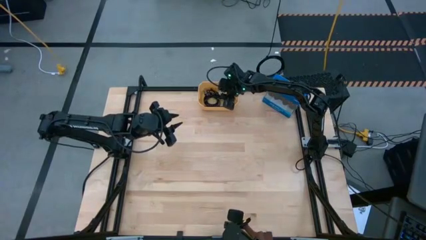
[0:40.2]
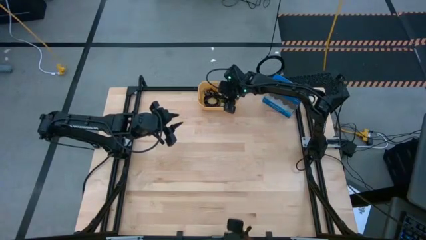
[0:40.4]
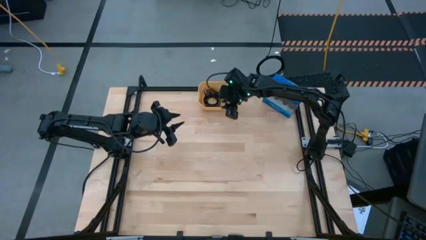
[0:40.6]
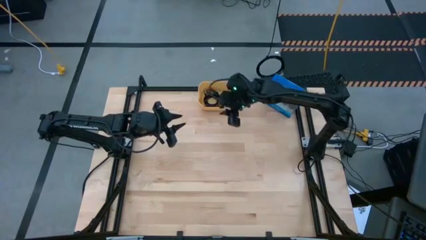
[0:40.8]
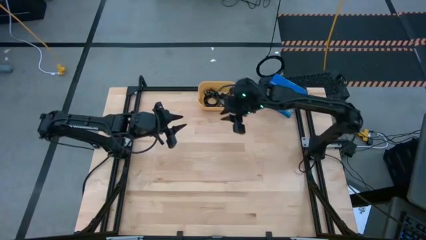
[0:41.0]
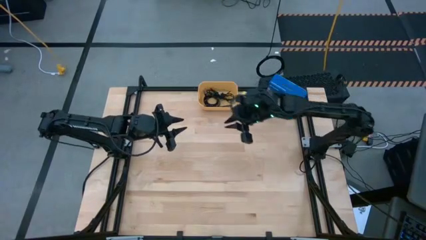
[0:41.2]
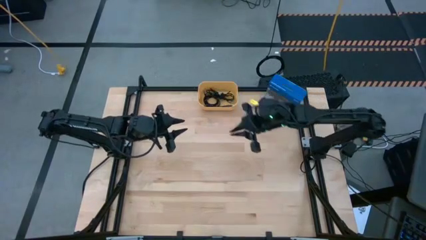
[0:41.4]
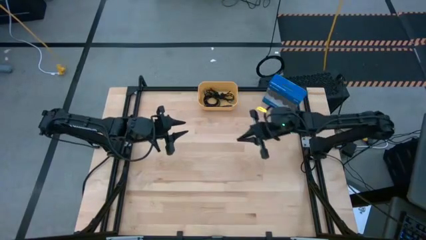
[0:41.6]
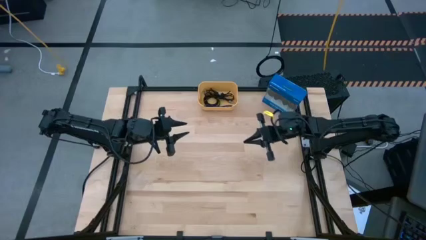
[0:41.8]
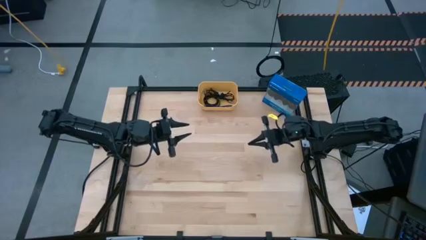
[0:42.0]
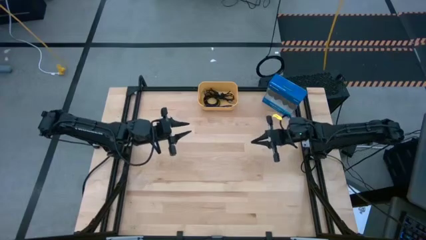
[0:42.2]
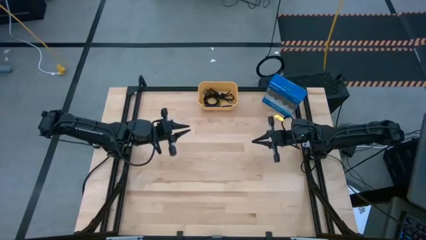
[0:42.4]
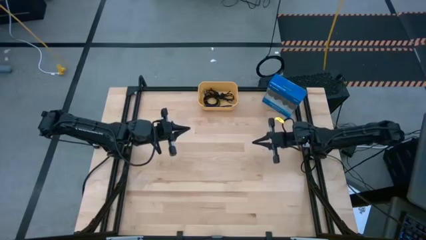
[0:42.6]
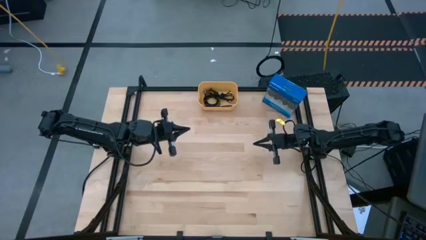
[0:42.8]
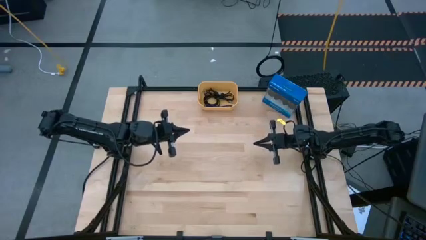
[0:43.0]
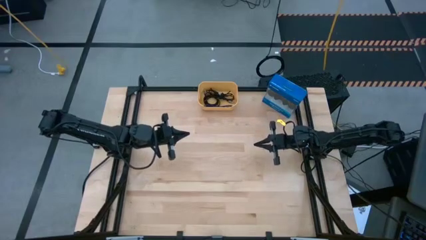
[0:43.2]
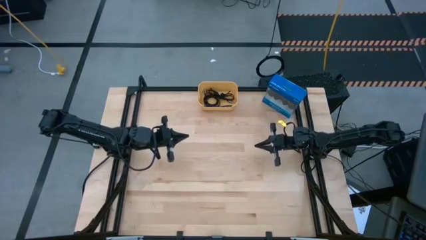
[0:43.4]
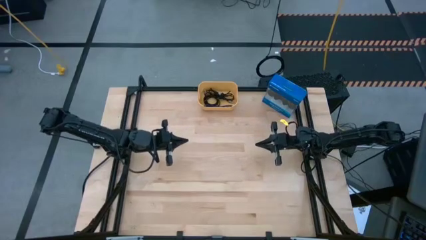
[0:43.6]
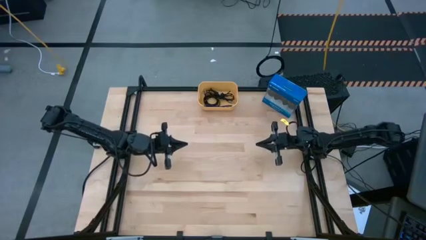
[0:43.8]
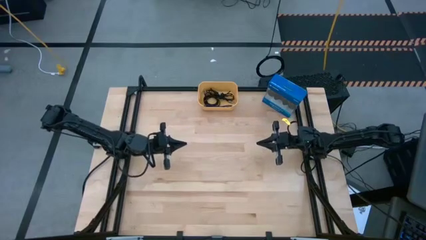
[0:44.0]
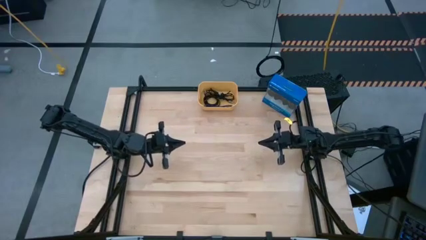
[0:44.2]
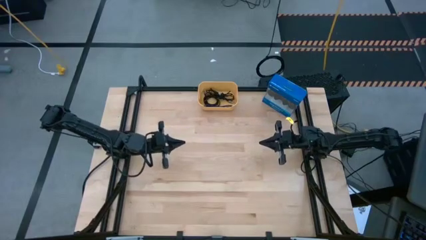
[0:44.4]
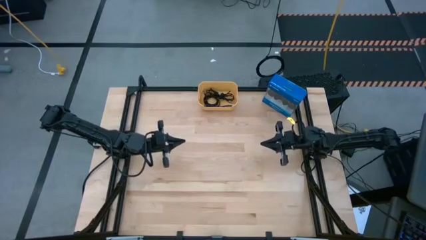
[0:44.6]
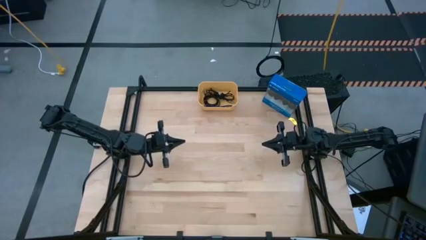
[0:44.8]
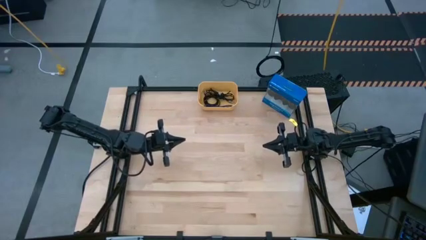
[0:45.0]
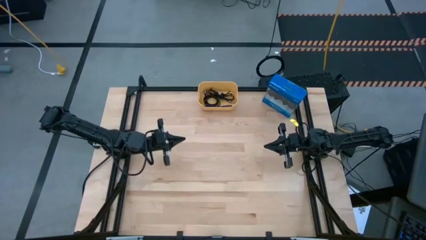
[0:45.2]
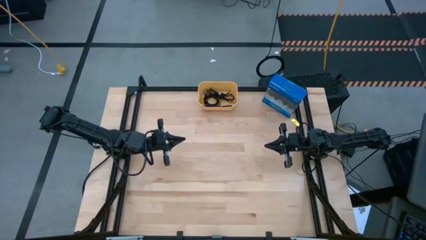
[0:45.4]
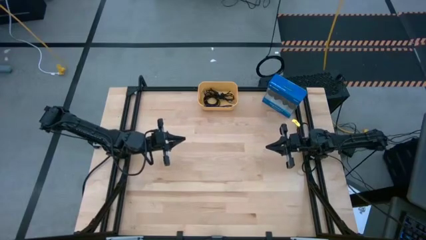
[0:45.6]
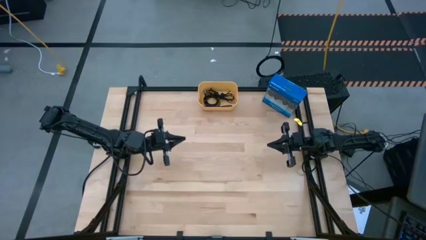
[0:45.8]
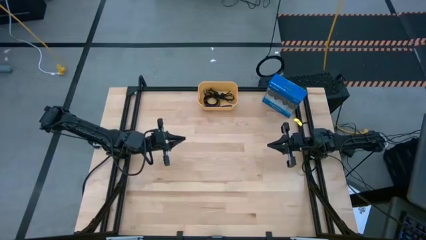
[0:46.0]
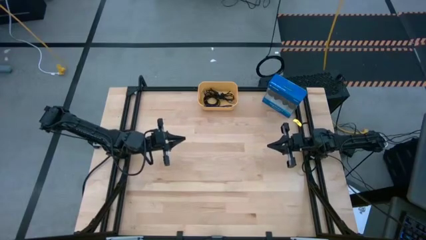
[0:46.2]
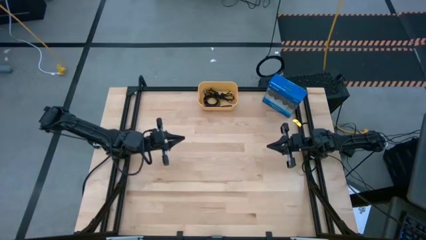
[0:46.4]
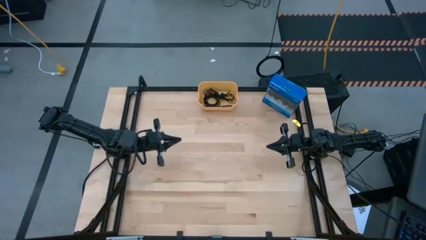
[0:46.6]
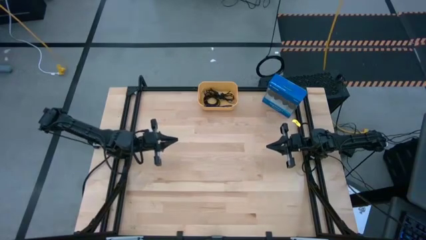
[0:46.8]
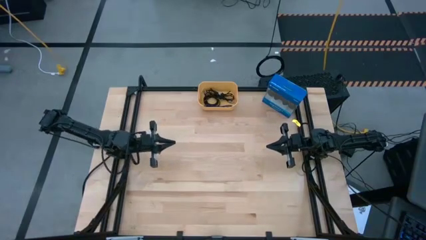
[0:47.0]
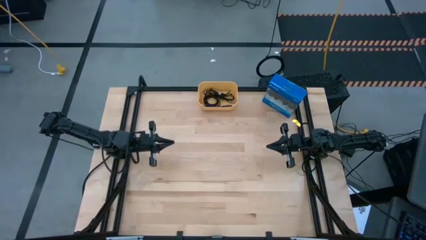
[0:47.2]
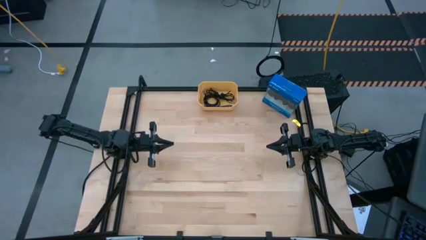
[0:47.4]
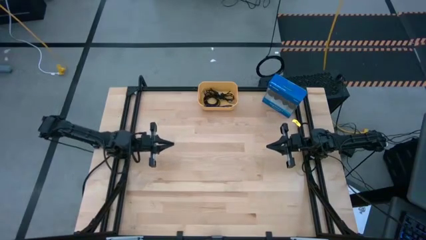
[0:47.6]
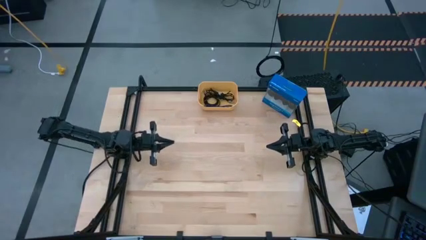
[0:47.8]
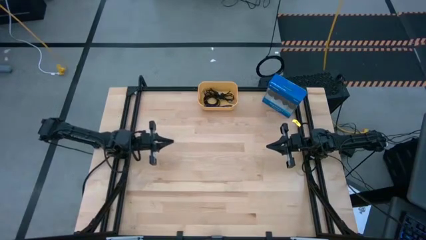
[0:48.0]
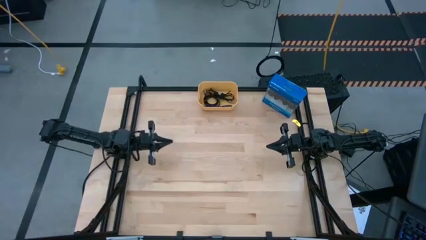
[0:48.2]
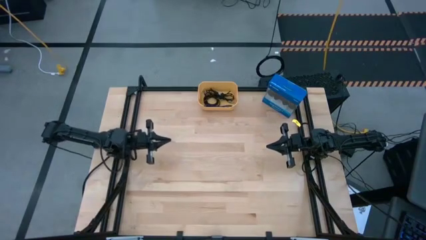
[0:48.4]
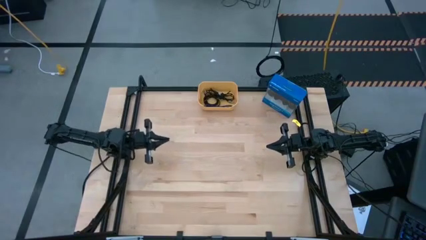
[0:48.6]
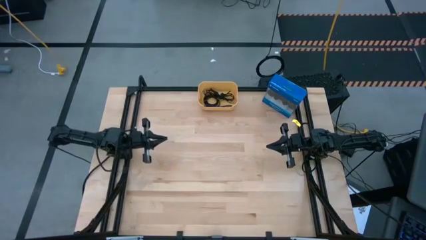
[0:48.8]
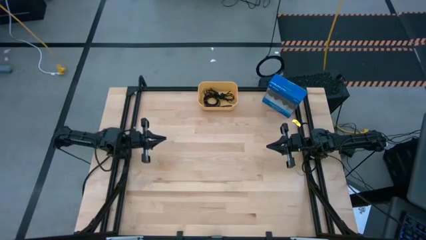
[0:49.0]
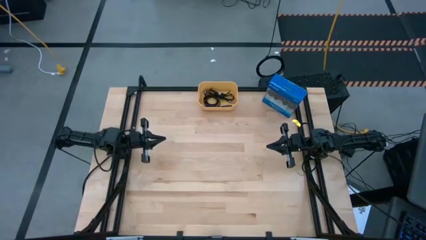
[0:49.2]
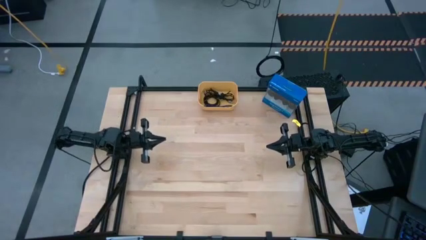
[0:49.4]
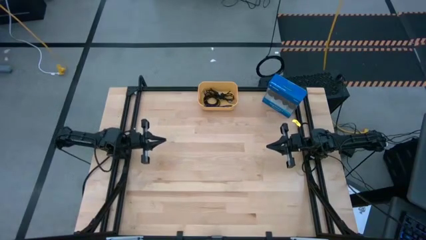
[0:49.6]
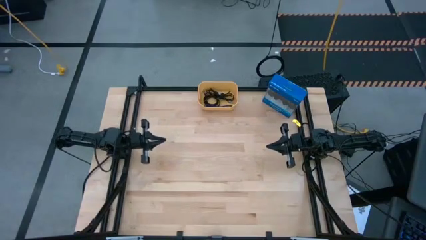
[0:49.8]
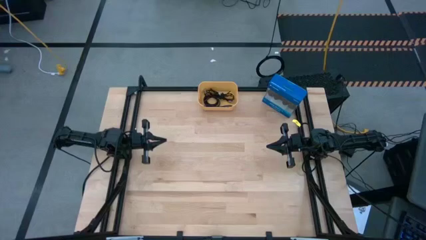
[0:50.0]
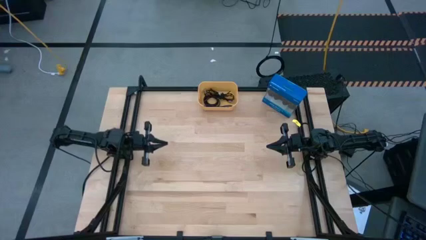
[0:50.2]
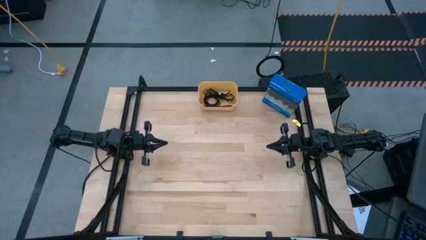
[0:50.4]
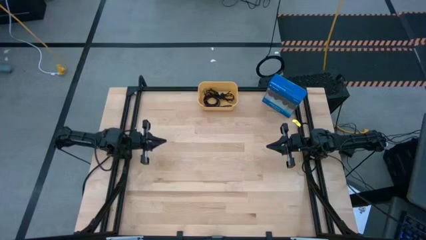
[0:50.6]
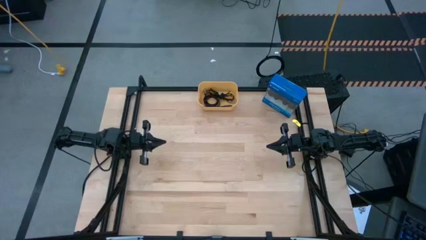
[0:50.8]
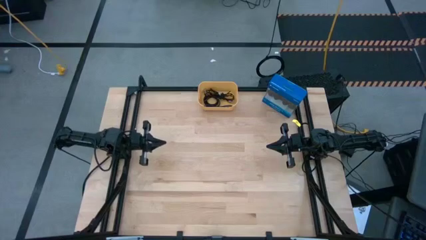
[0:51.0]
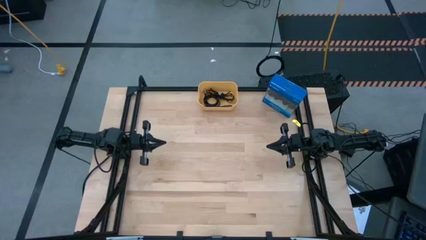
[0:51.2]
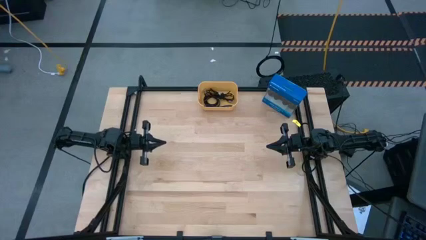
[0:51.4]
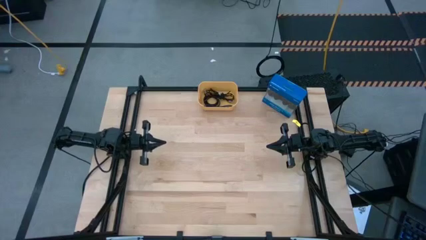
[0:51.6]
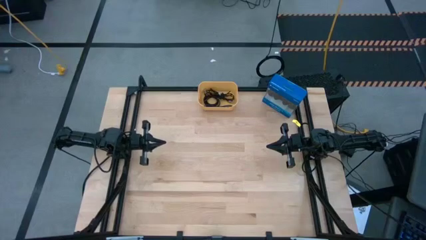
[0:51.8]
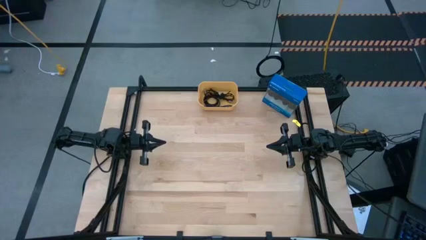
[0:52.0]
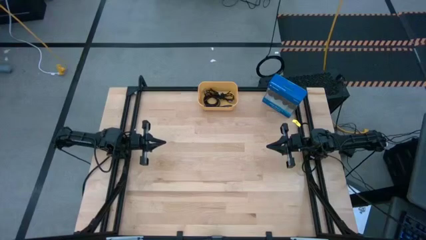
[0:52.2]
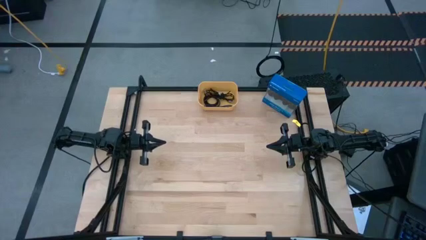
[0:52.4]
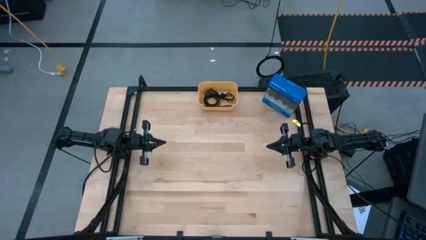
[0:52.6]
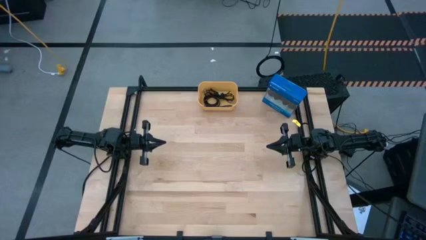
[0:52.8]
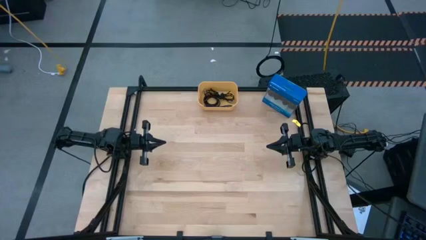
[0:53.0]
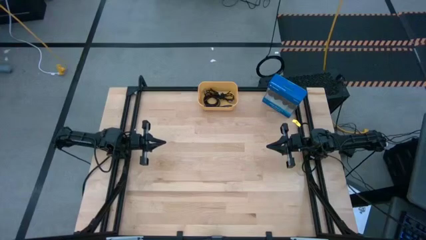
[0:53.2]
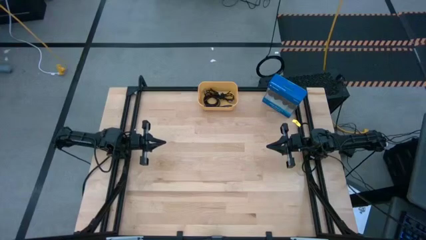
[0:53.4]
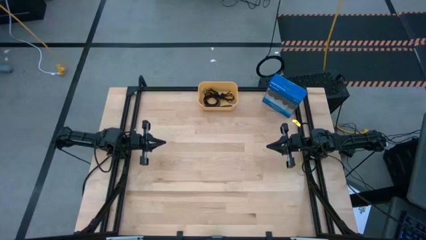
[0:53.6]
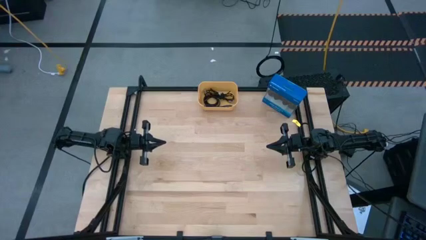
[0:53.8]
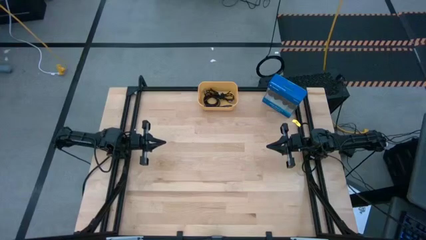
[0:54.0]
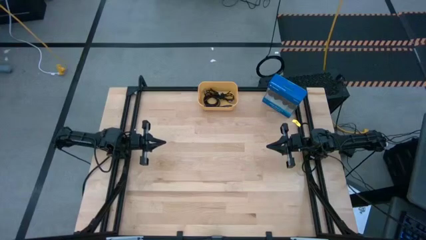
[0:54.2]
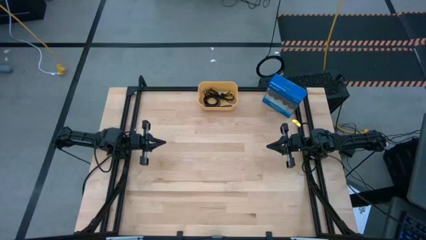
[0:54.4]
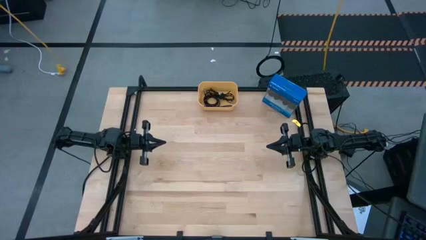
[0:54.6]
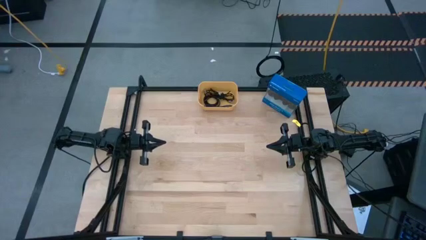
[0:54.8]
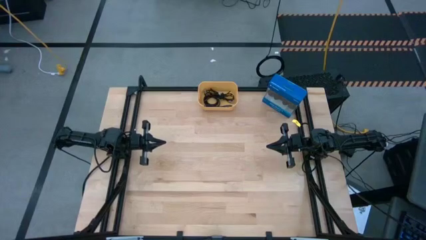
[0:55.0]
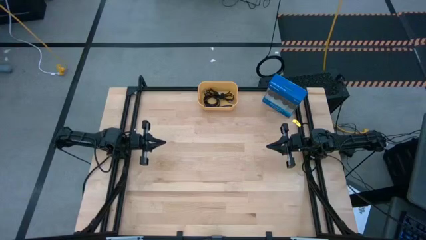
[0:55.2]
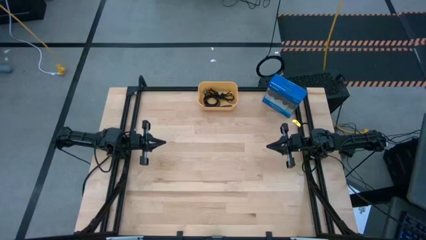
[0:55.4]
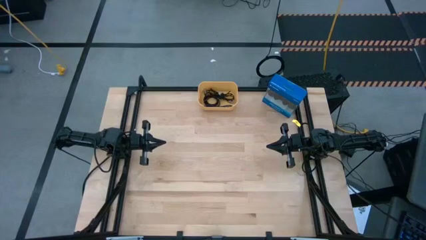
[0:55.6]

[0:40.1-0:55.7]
Task: Pick and place USB-C Cables
Return to Home Position

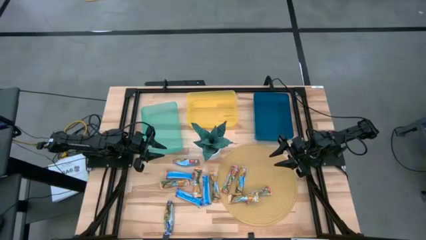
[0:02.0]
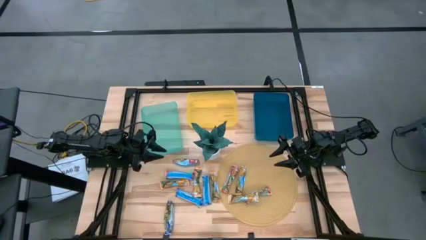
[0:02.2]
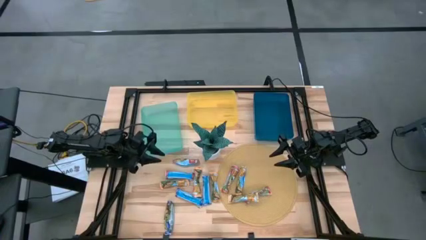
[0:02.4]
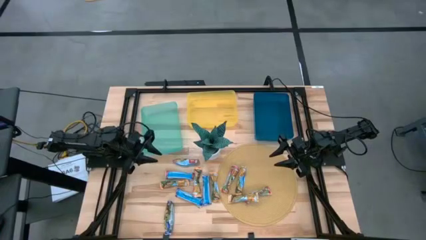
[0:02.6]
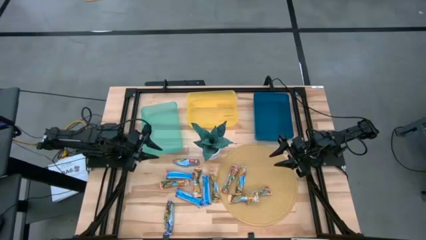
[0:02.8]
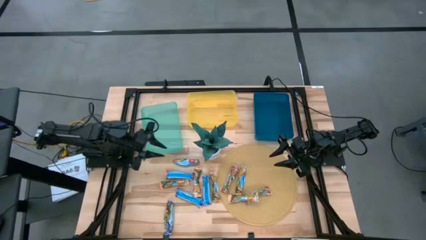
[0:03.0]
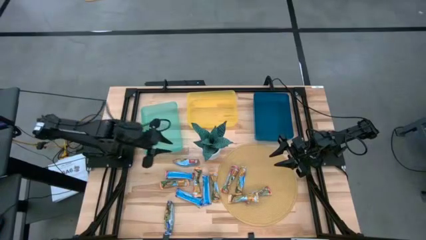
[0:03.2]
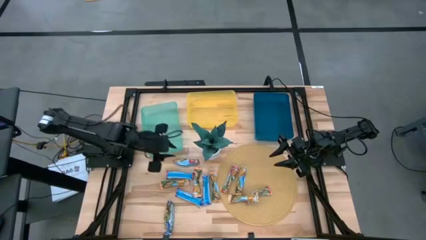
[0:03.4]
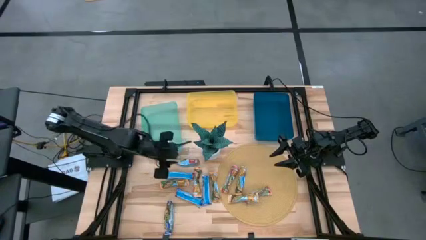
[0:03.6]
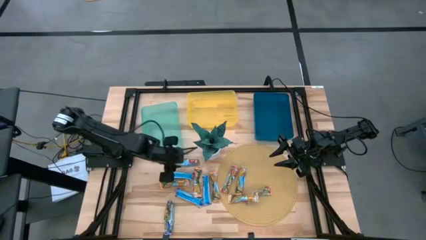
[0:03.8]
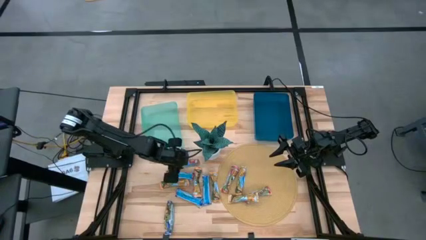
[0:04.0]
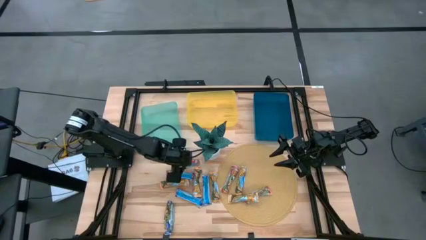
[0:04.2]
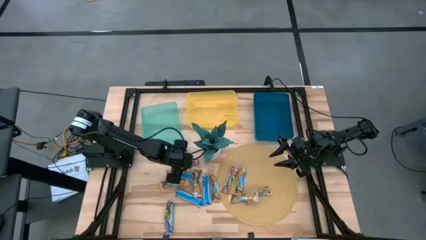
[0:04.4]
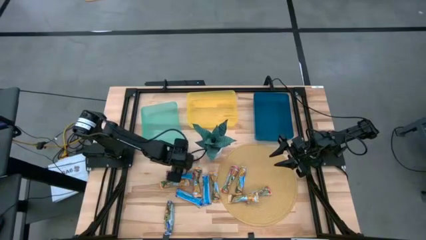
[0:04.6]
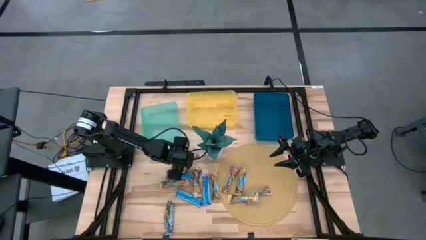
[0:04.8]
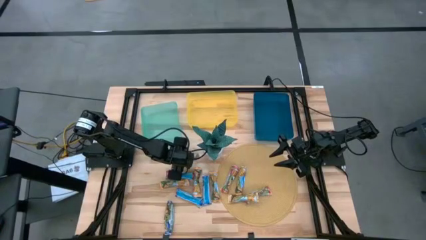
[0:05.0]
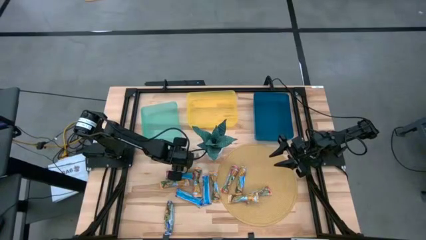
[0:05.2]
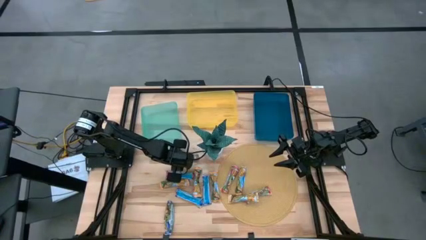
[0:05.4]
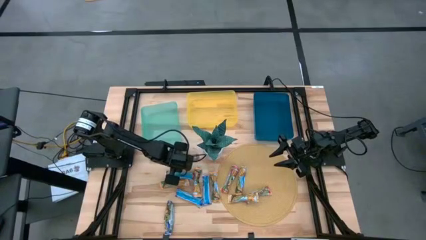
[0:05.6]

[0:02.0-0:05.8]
Task: Pick and place Granola Bars by type
Put the red granola bar into the yellow bin
